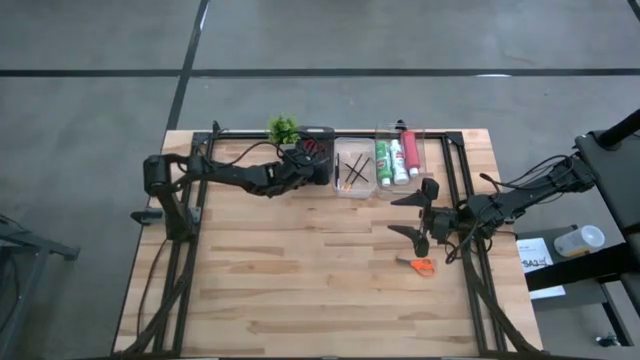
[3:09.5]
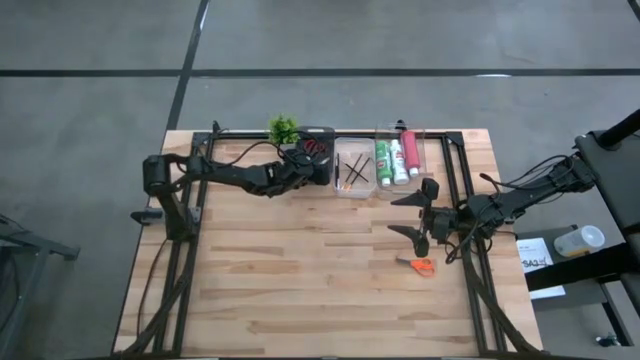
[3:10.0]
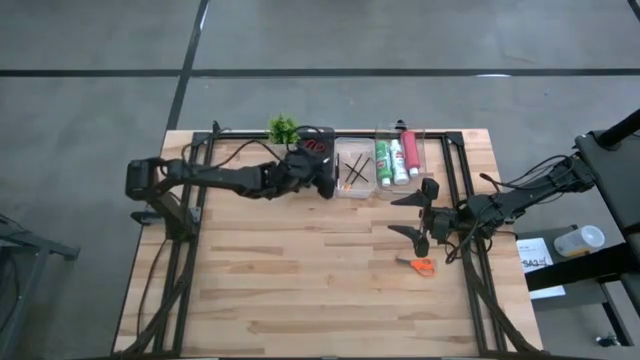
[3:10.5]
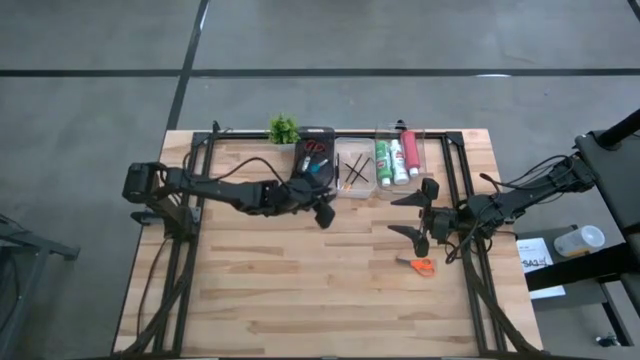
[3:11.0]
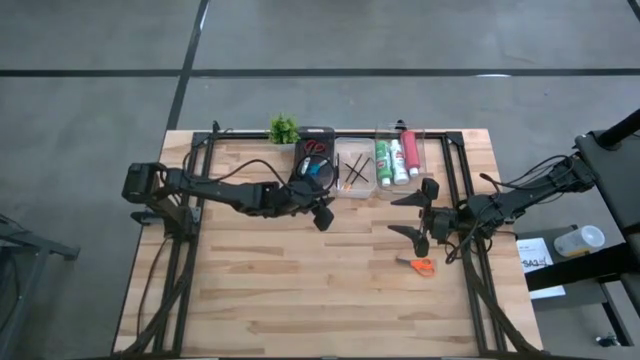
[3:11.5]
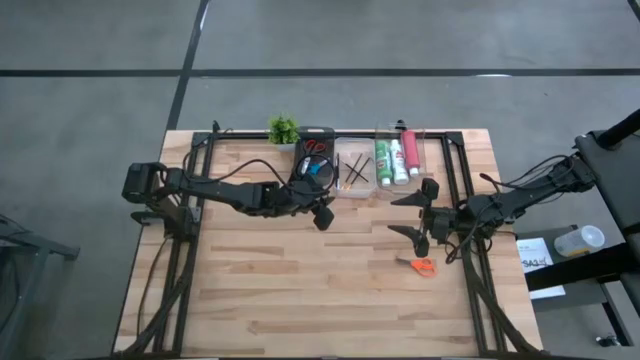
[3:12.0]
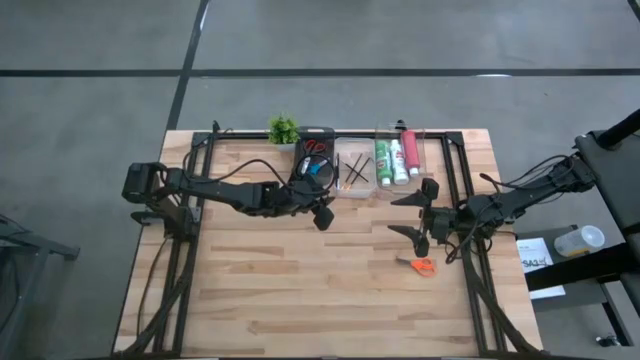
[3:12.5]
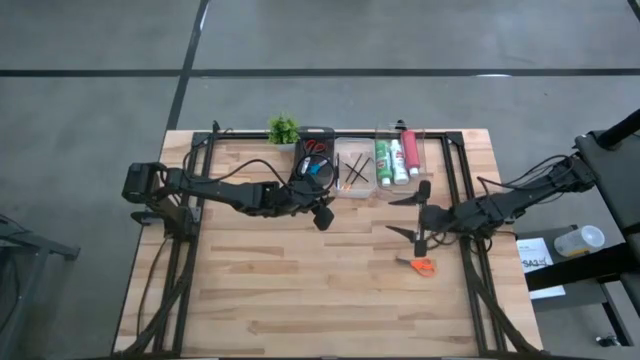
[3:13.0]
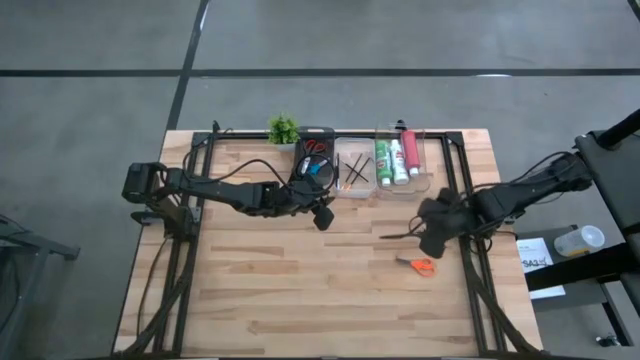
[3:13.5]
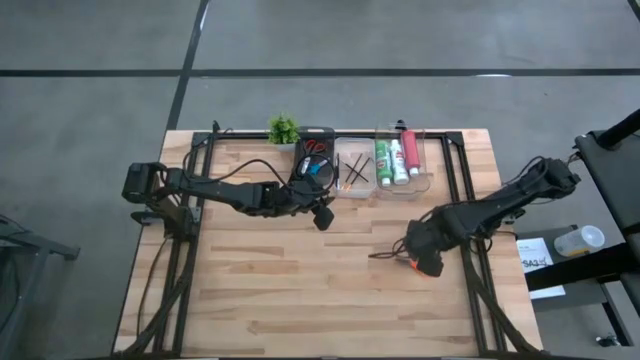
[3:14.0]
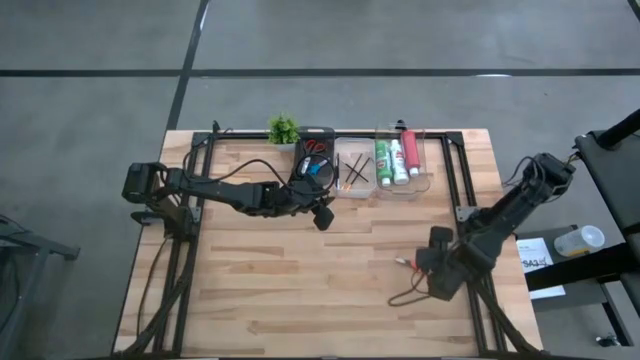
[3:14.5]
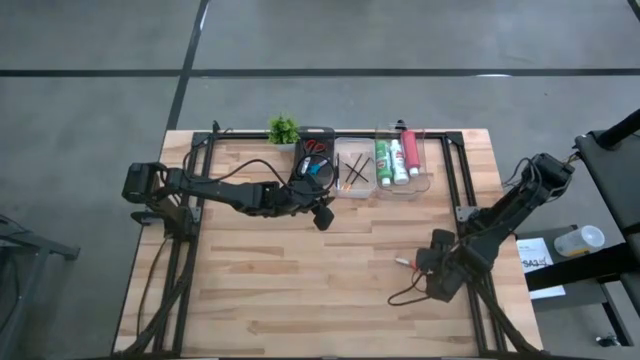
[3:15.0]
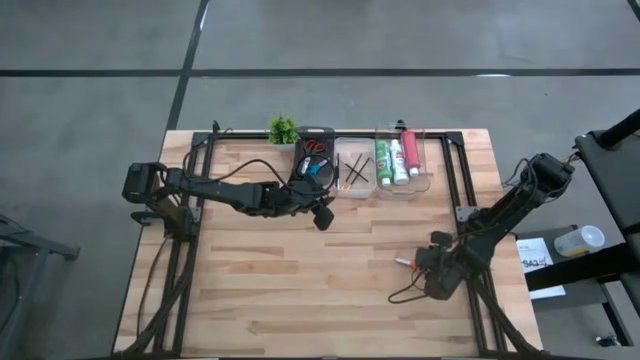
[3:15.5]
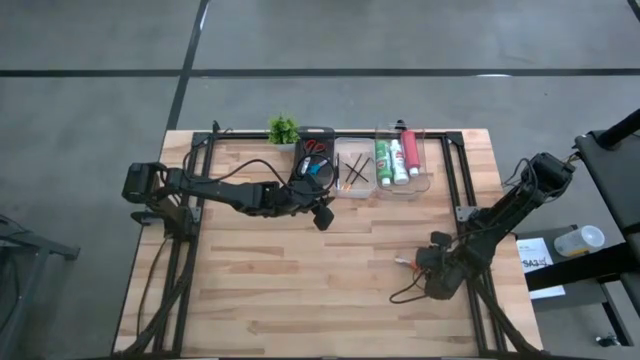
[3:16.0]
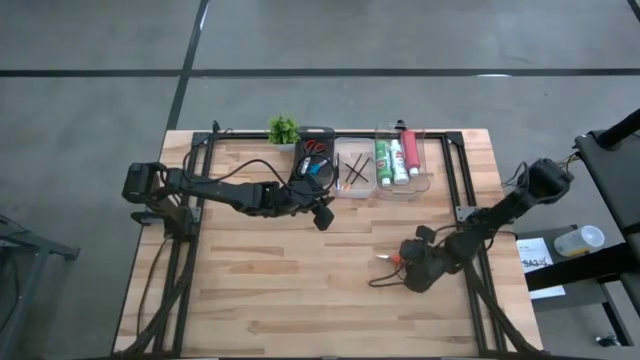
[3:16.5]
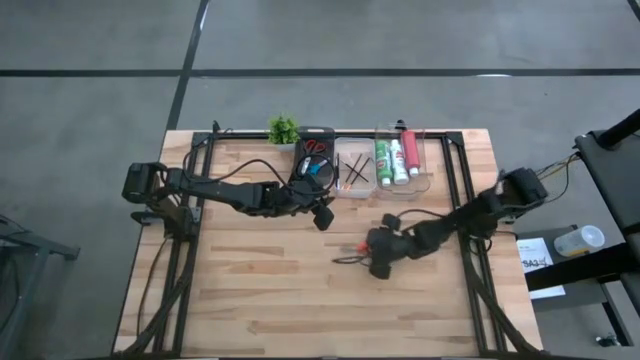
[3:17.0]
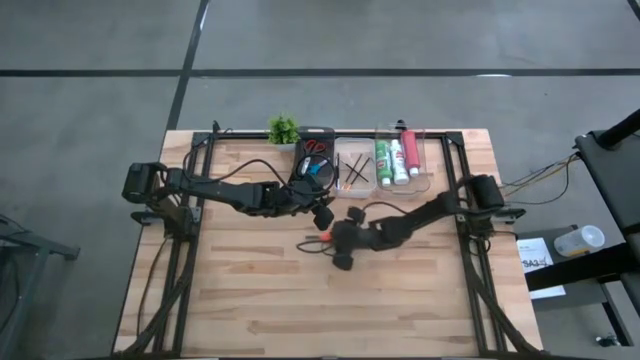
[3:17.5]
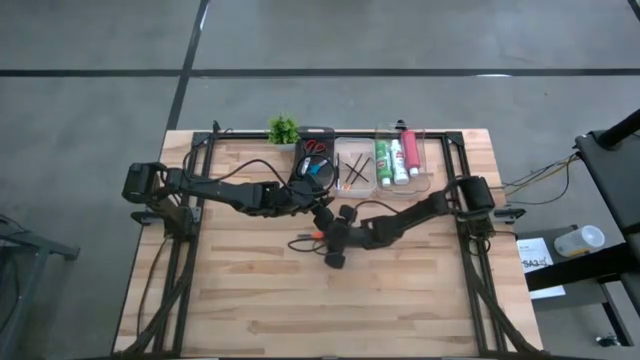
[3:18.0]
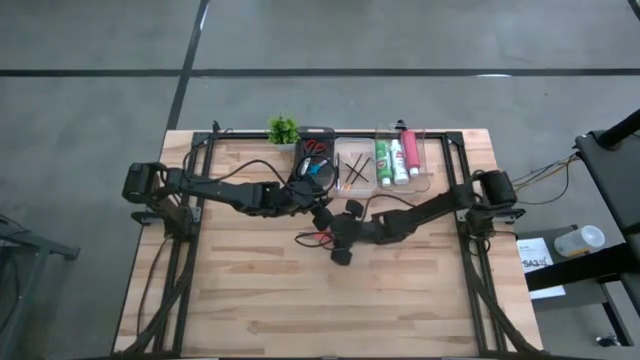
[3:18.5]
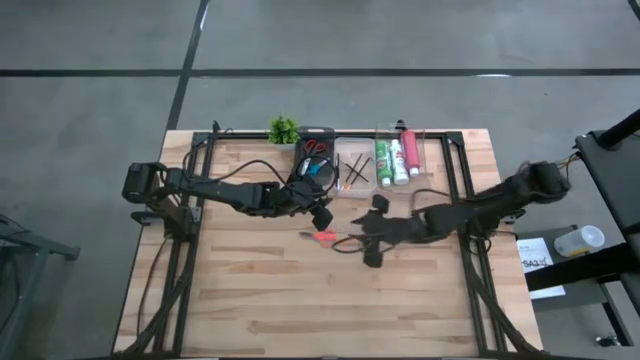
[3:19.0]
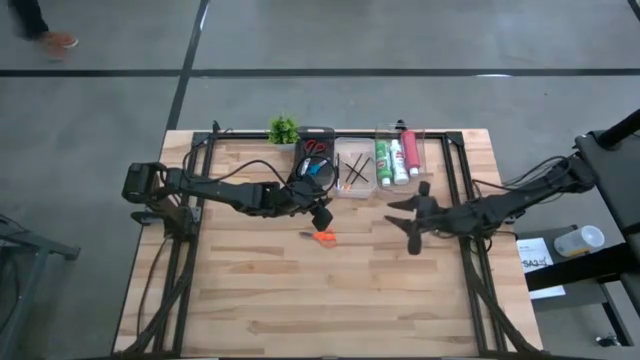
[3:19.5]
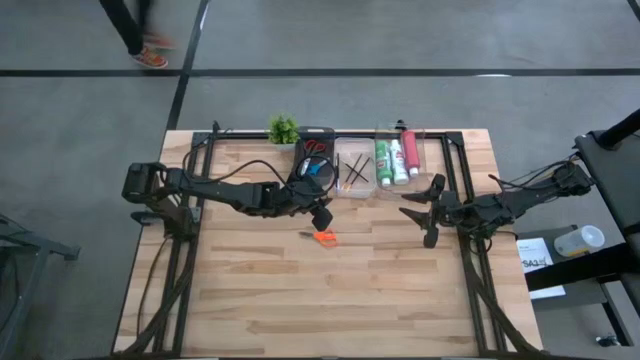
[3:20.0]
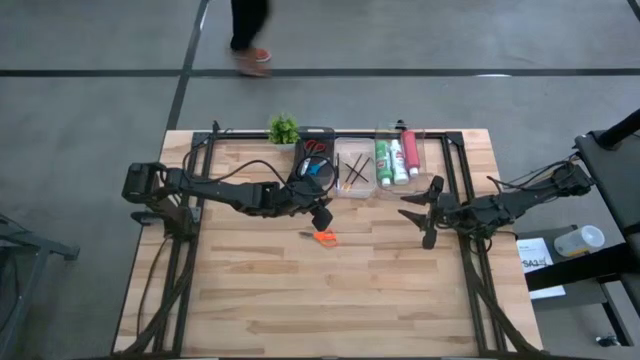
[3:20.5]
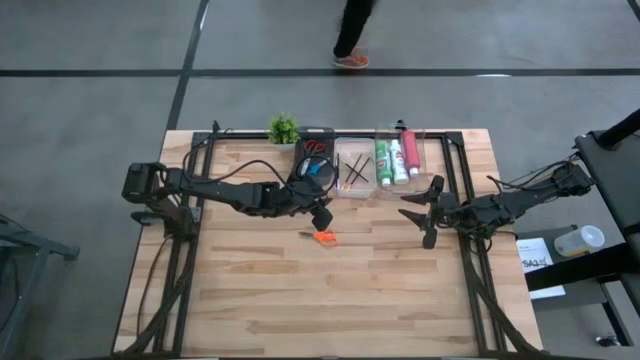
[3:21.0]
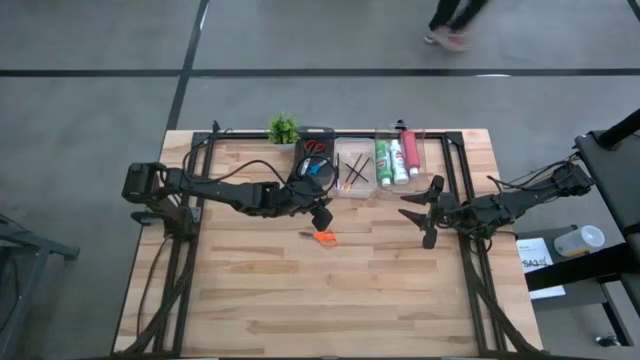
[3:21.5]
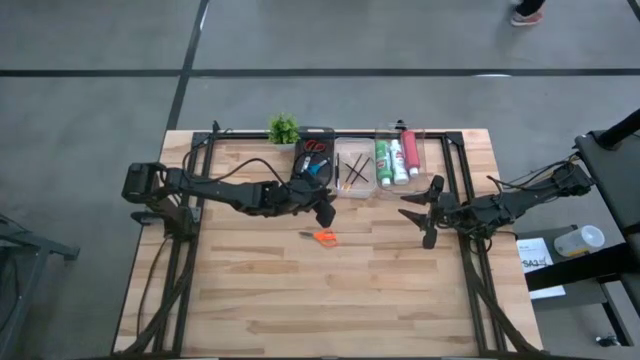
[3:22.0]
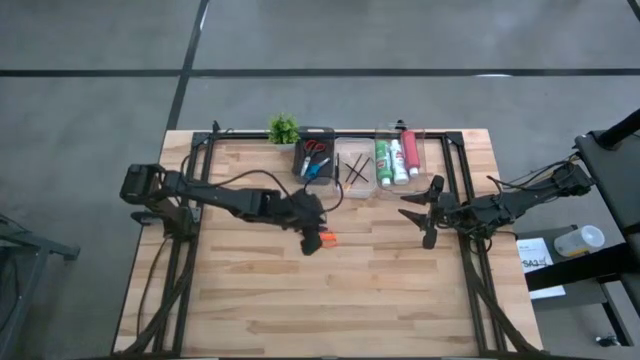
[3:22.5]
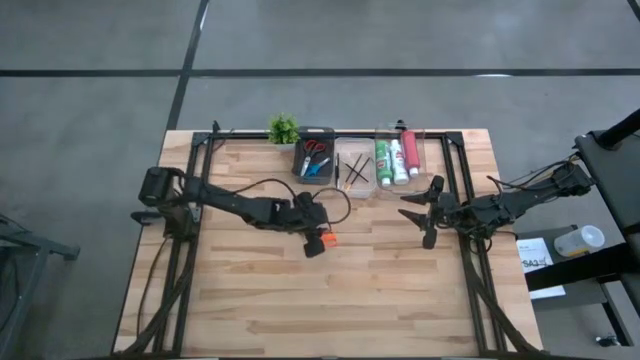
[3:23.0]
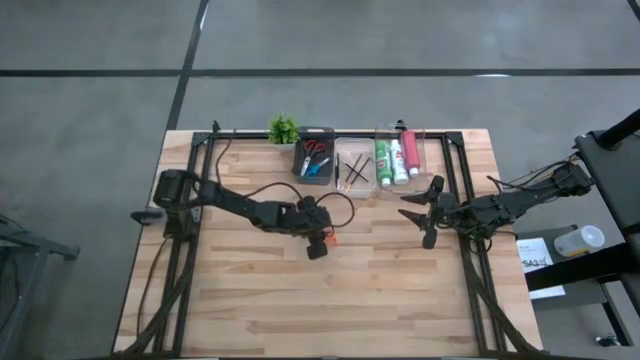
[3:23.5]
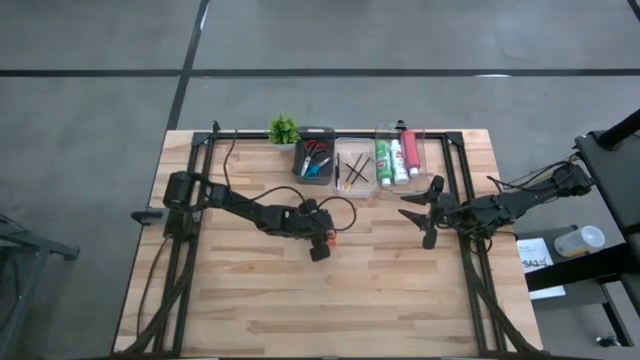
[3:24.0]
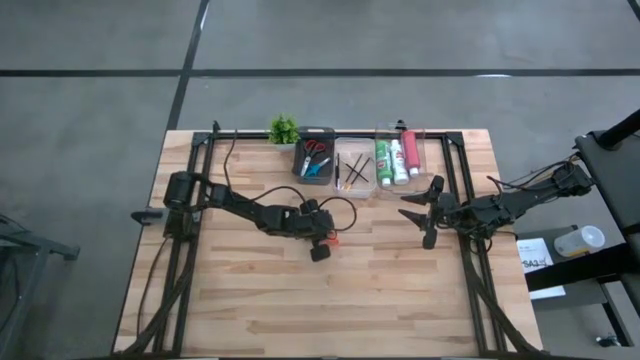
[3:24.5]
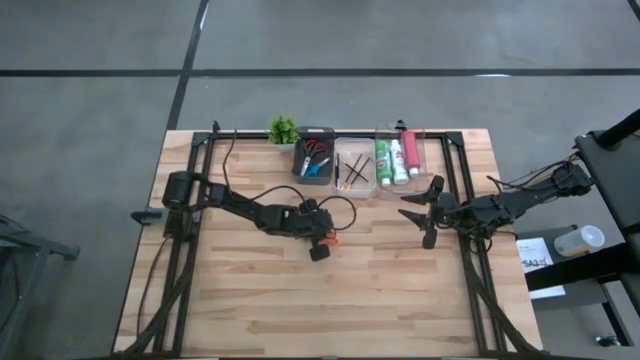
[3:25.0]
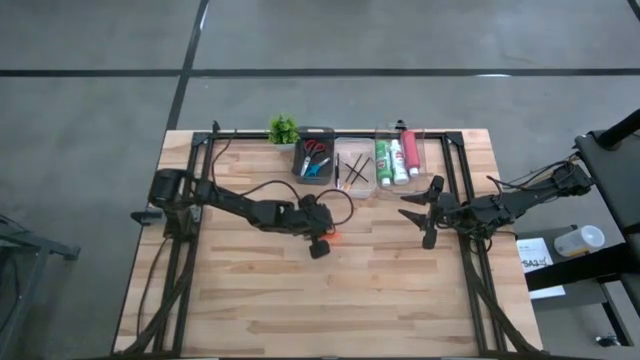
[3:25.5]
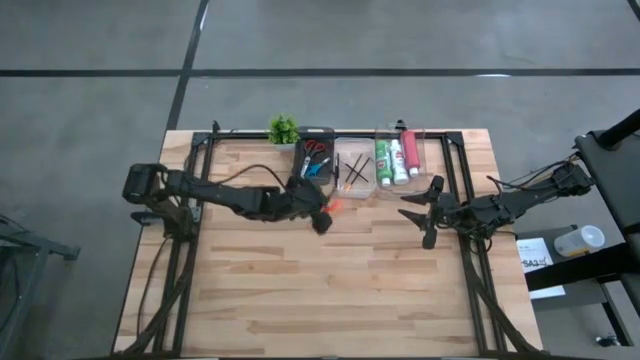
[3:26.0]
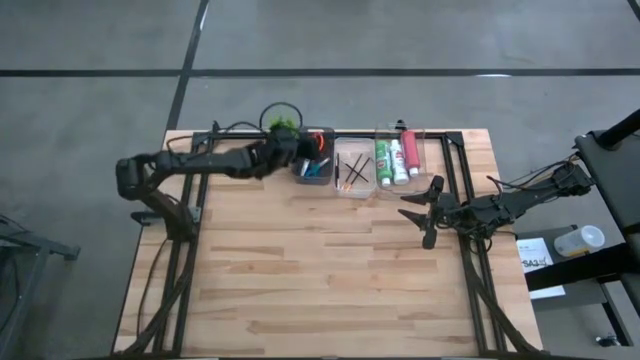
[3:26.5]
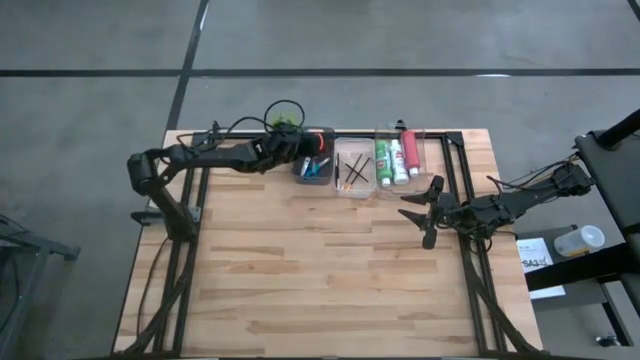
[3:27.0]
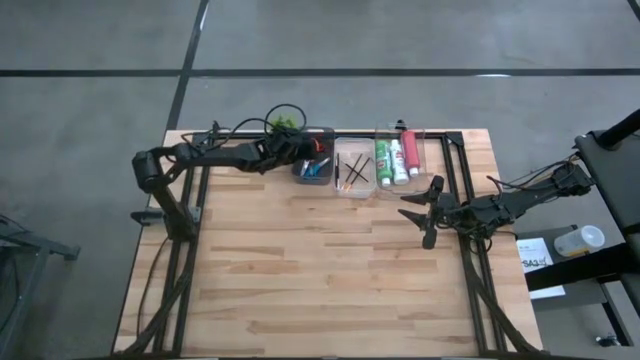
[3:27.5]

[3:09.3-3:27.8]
Task: Pick & Place Paint Supplies
Put the orange scissors into the black bin

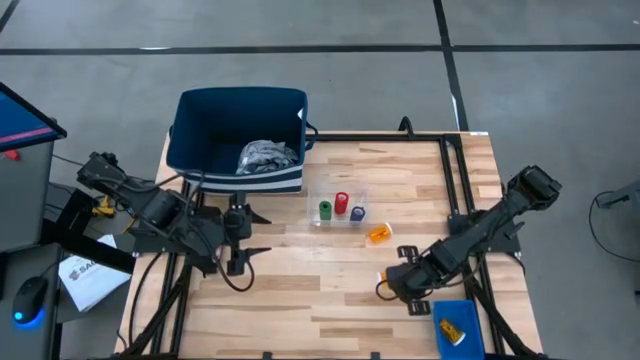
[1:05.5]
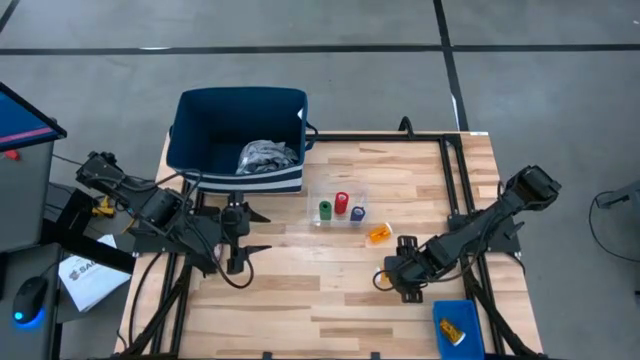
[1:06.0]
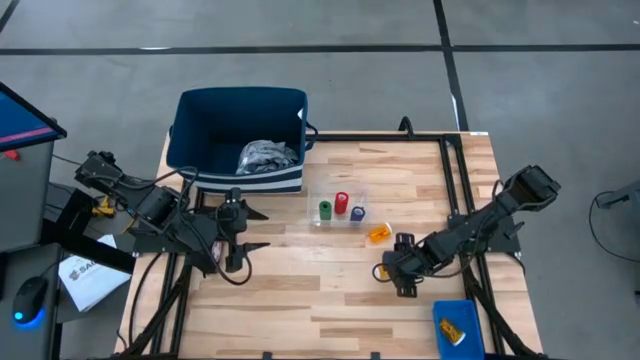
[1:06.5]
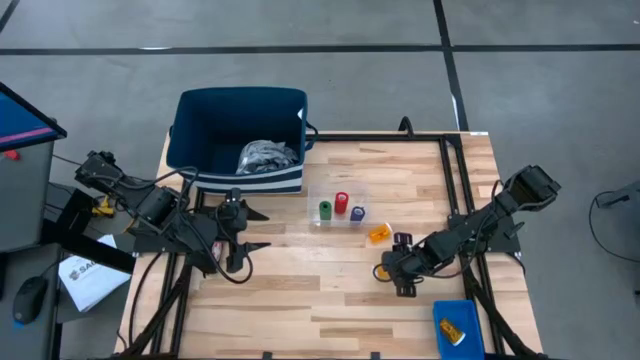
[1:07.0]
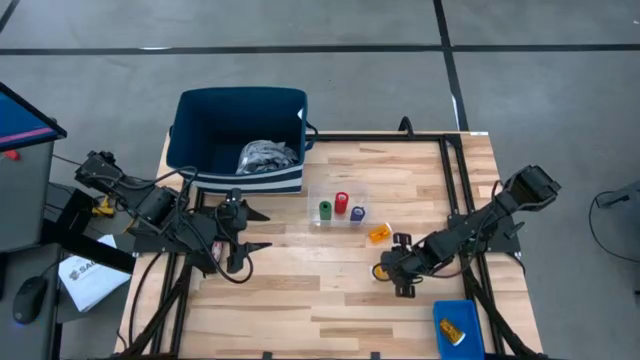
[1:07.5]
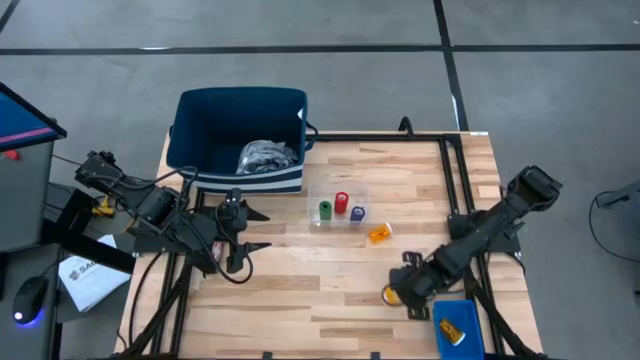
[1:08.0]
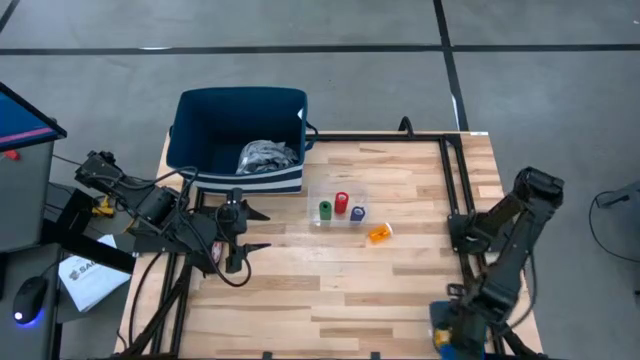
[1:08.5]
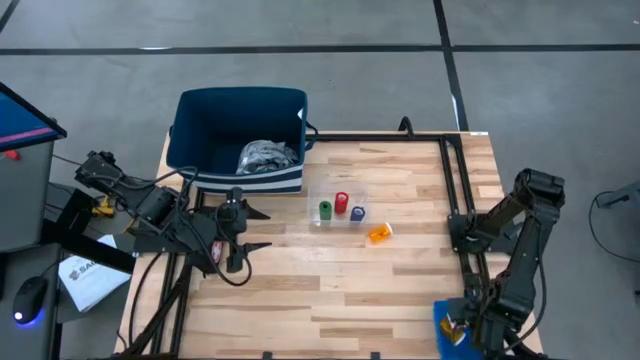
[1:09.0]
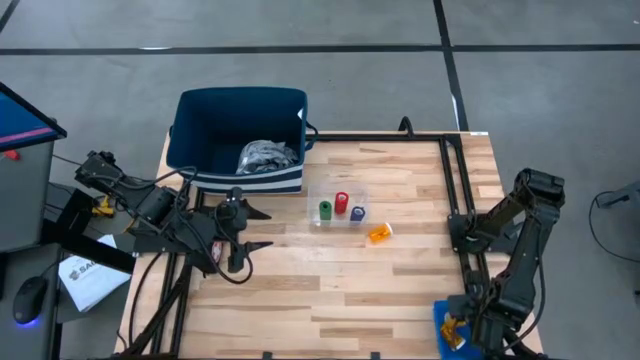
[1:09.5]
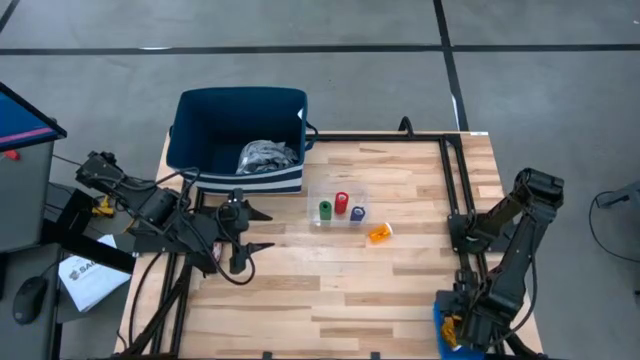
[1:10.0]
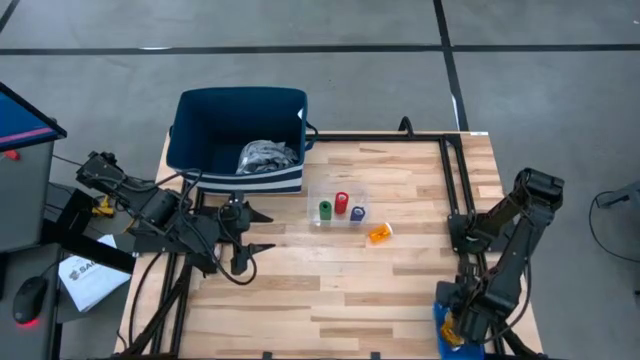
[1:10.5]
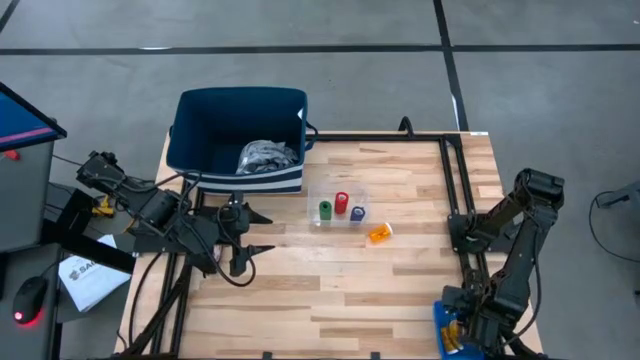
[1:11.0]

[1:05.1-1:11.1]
Task: Pick & place medical supplies in basket/bin
Put the bottom orange pill bottle into the blue basket
